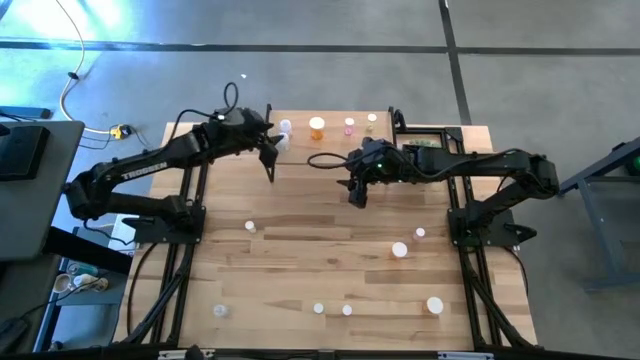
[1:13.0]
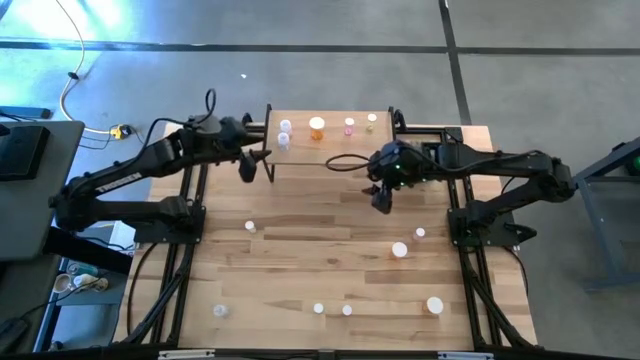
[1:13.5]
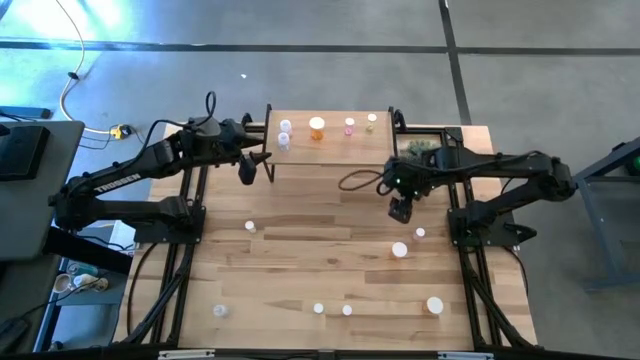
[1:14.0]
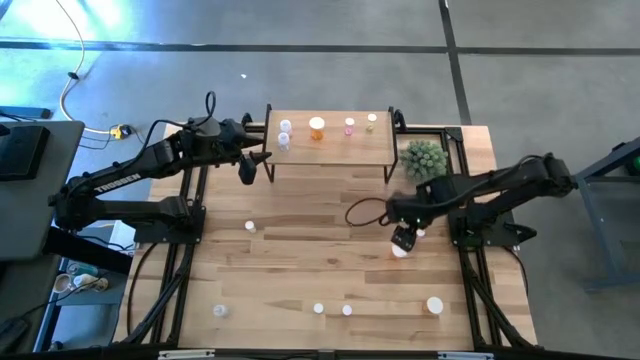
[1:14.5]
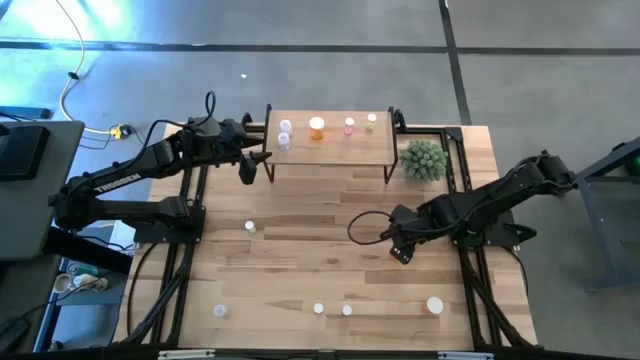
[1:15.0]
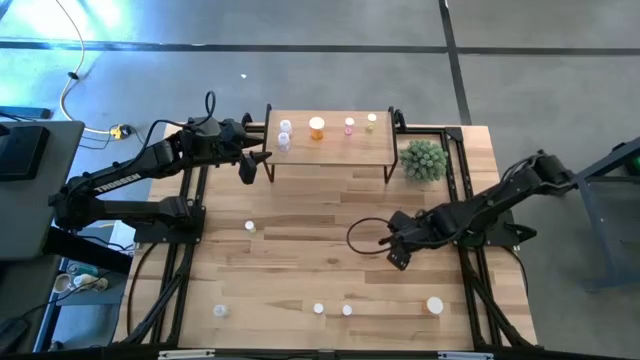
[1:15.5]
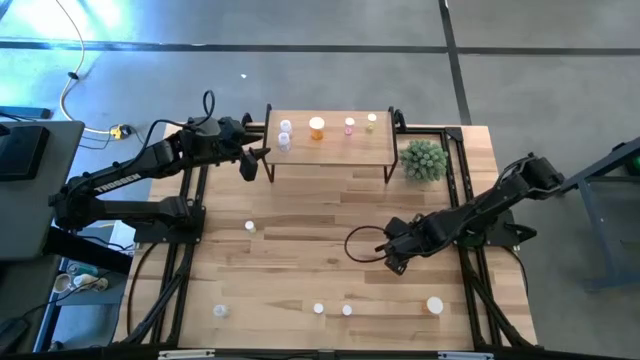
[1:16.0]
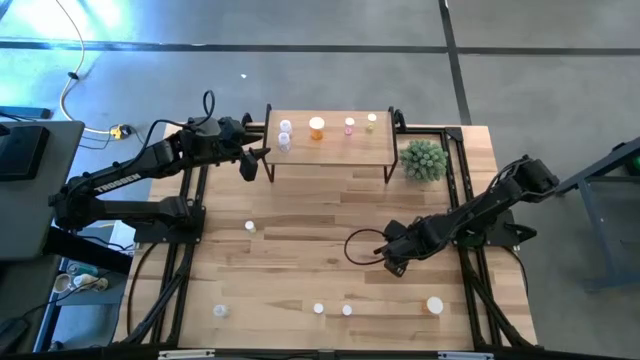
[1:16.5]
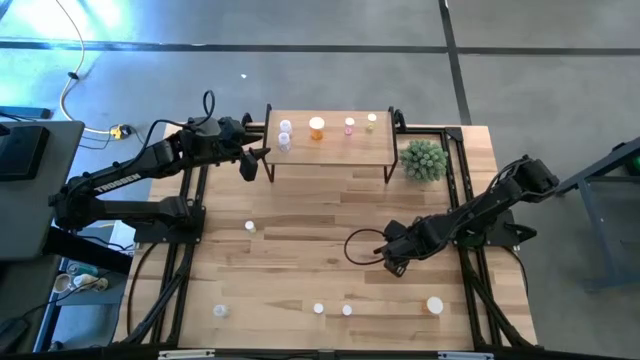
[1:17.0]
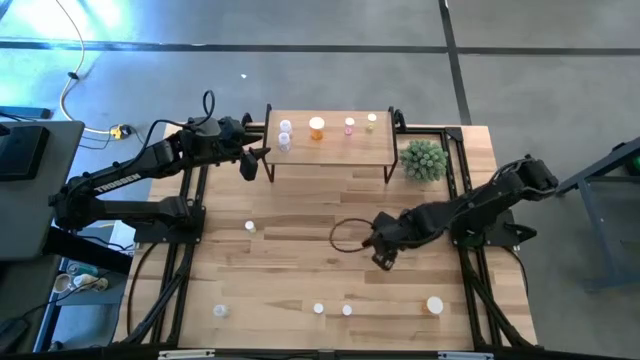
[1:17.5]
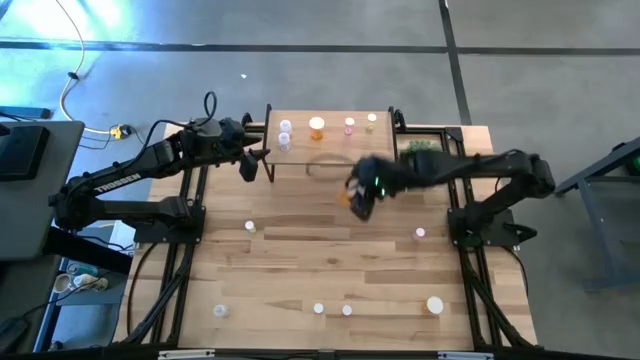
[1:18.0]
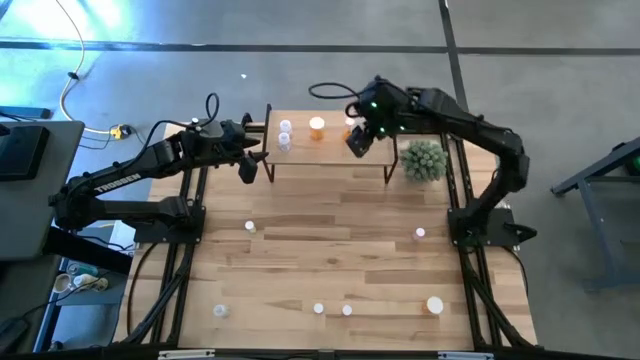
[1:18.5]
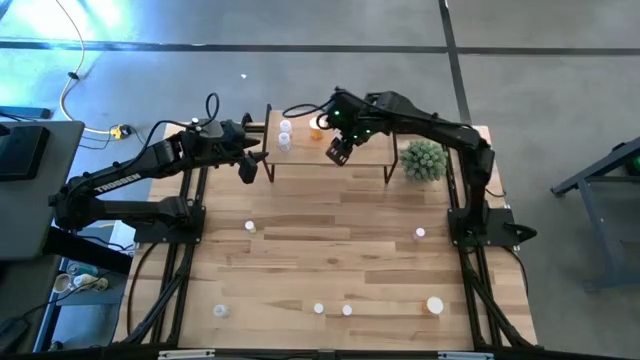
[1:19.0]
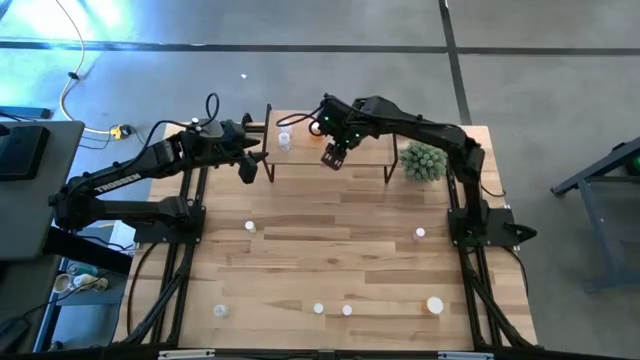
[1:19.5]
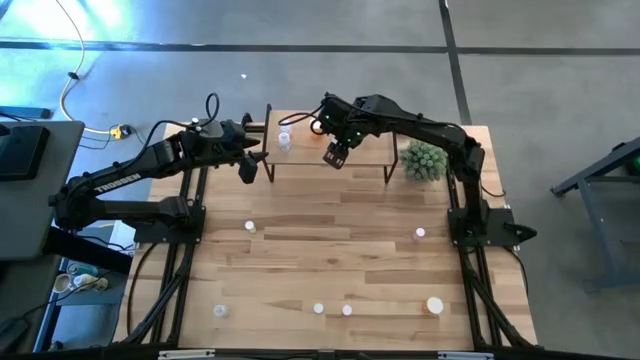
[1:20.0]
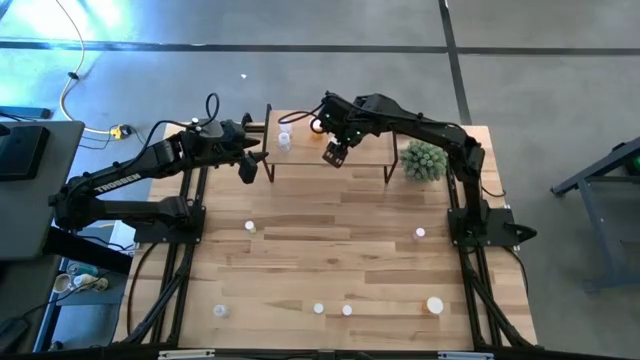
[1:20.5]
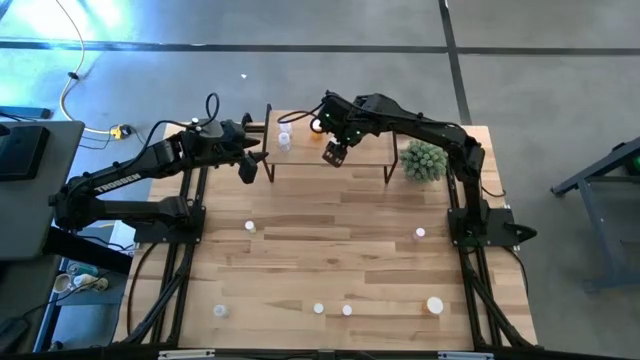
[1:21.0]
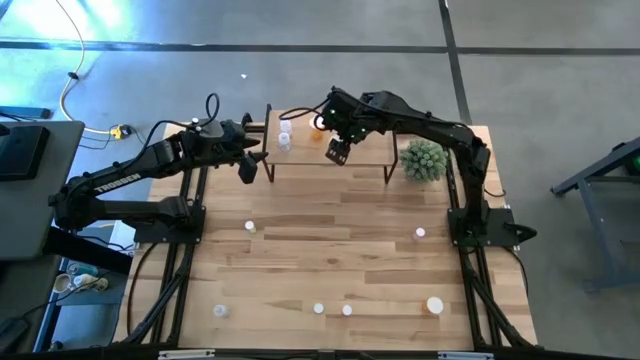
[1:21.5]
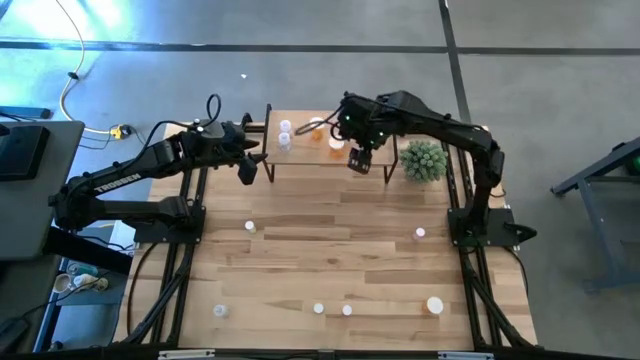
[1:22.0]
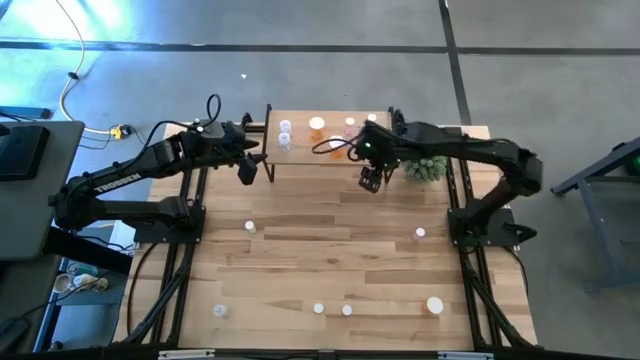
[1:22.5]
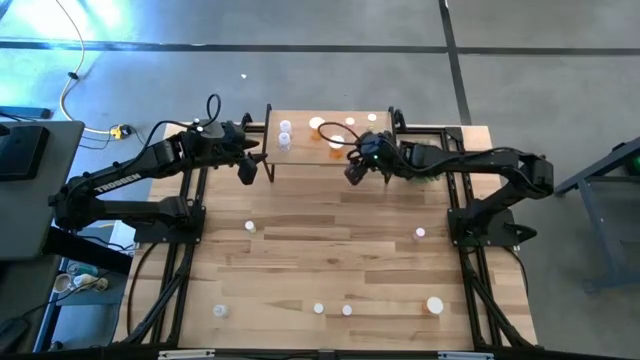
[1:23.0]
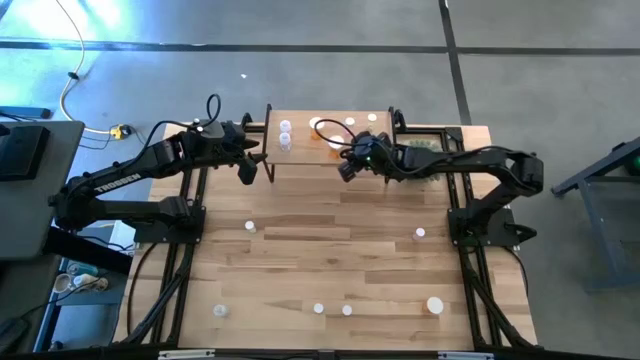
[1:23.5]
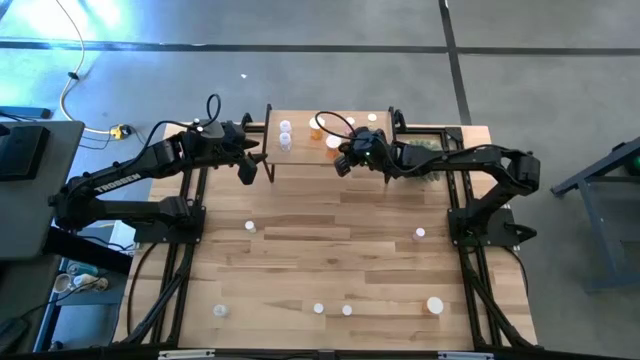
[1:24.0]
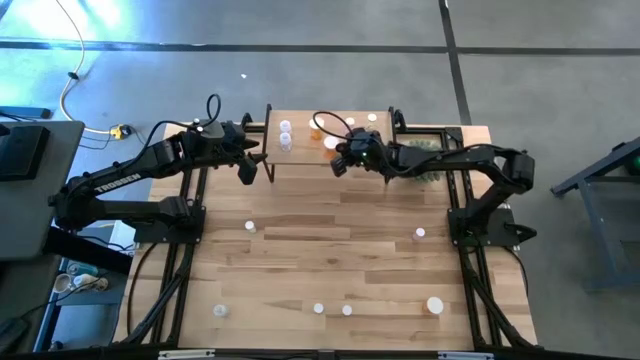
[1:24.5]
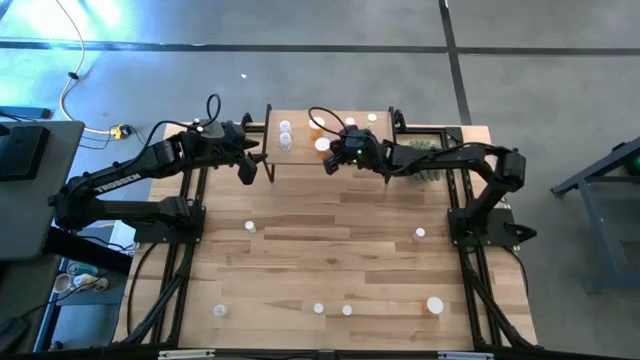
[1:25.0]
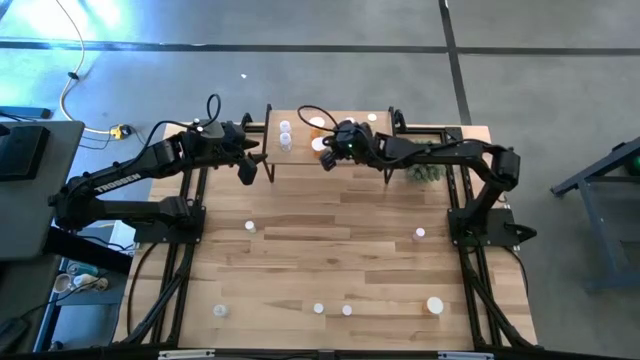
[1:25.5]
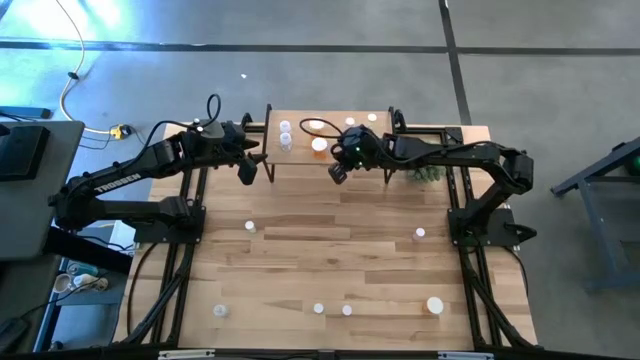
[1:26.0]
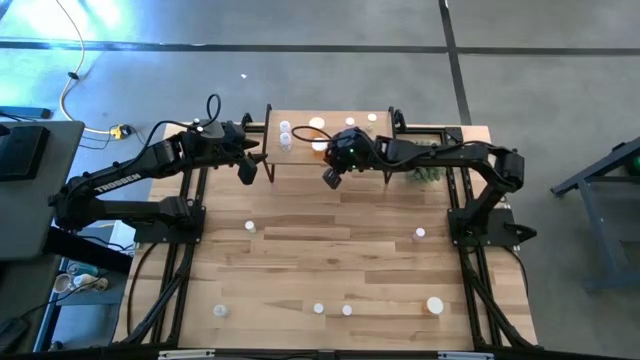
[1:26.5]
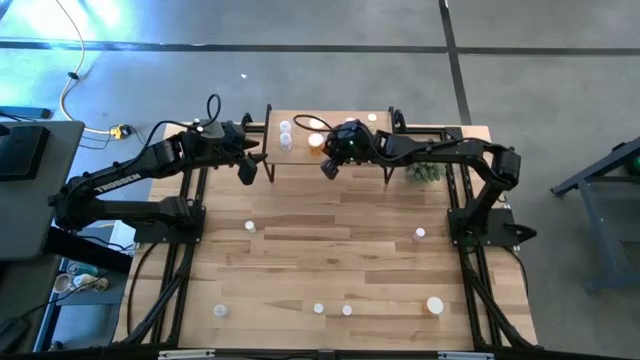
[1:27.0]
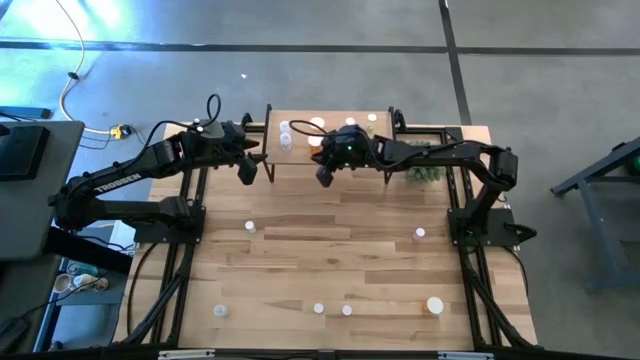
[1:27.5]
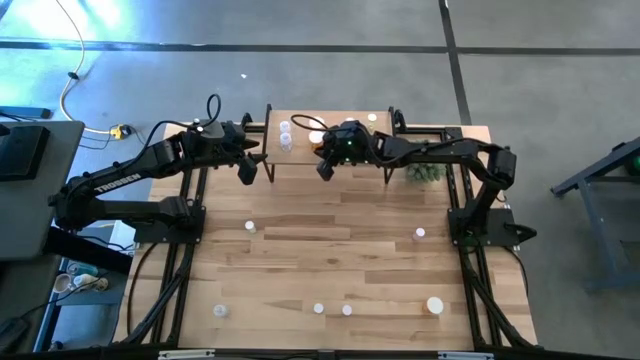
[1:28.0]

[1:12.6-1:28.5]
Task: Pick and place medicine bottles onto shelf by color
Put the top orange pill bottle aligned with the other orange pill bottle on the shelf

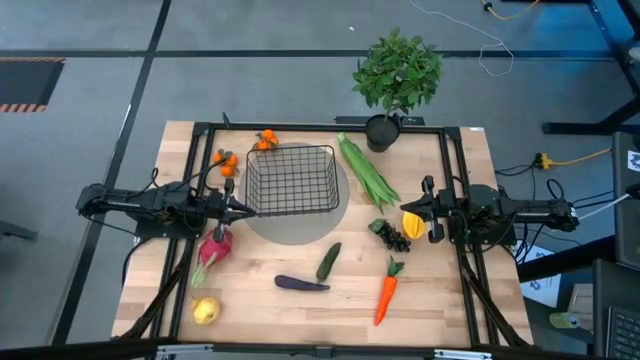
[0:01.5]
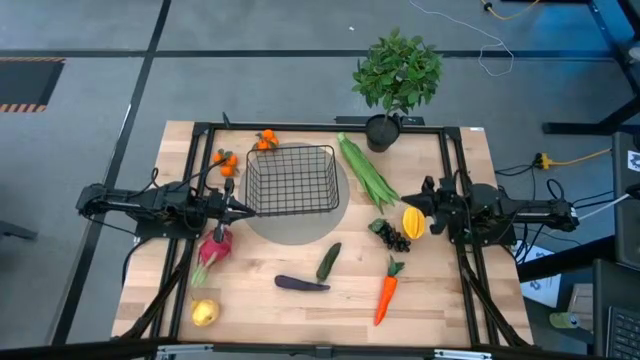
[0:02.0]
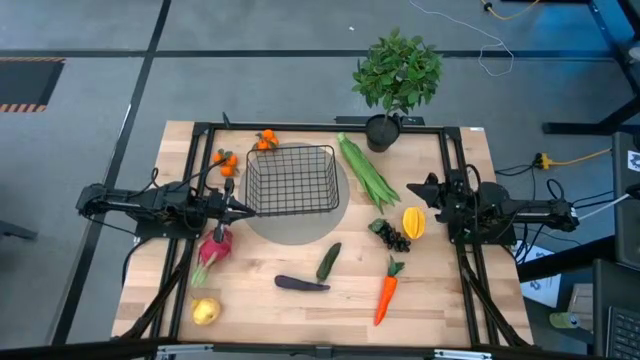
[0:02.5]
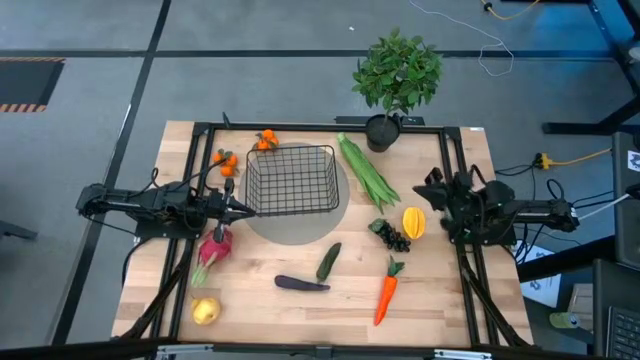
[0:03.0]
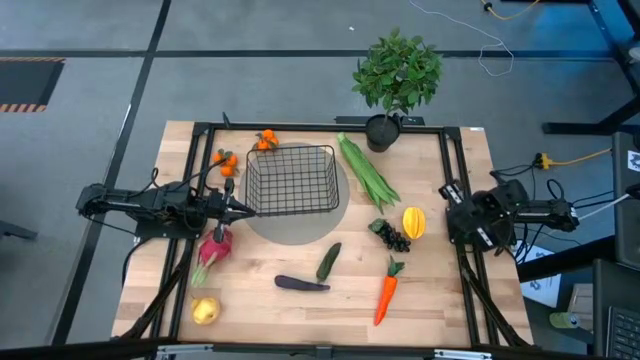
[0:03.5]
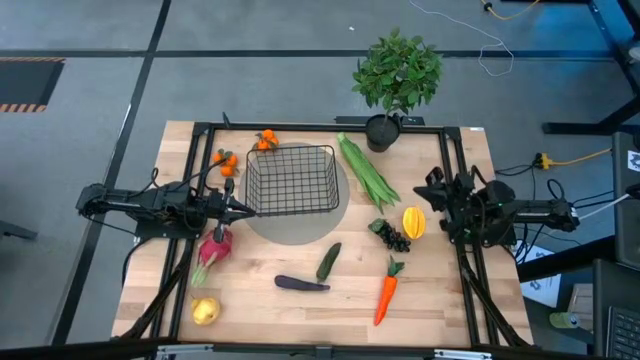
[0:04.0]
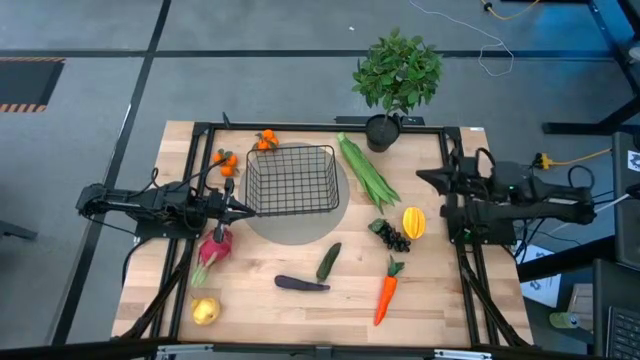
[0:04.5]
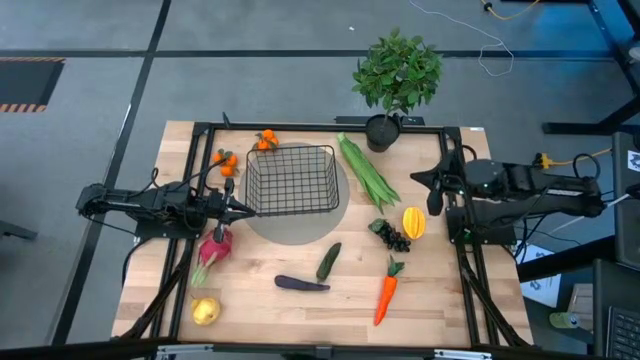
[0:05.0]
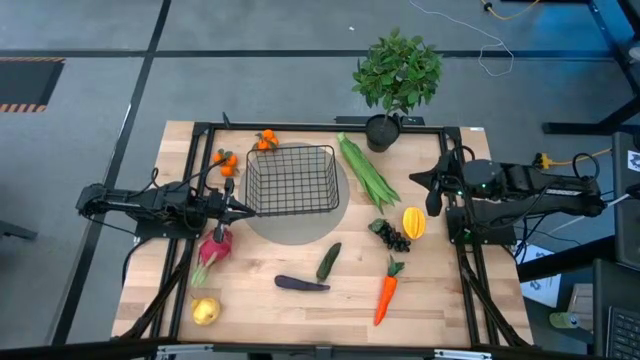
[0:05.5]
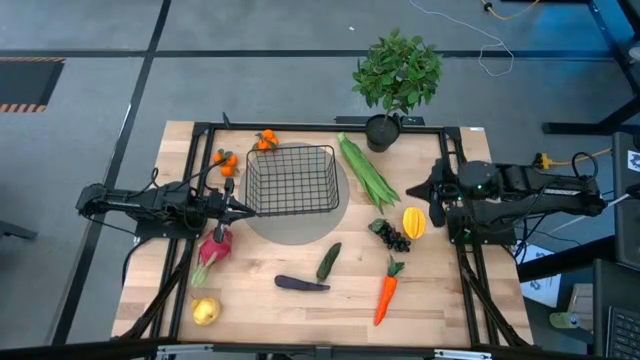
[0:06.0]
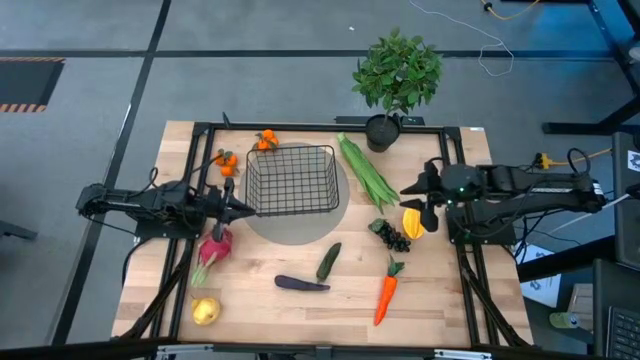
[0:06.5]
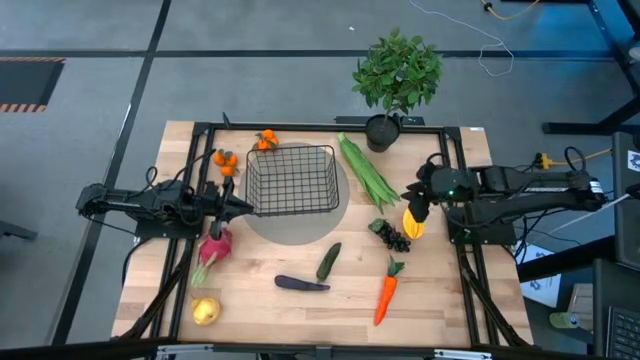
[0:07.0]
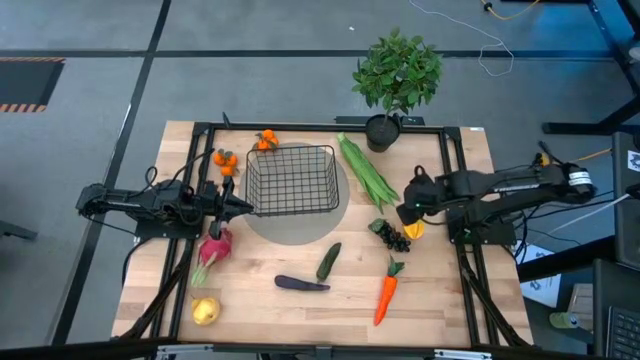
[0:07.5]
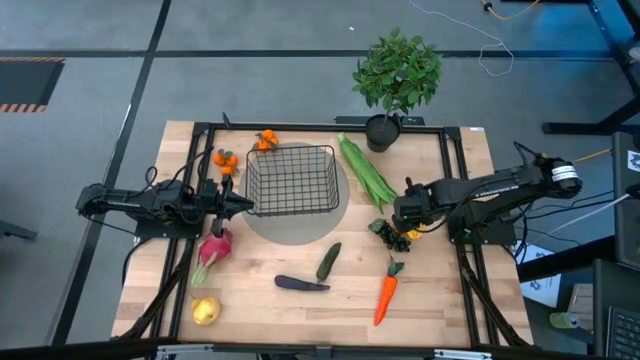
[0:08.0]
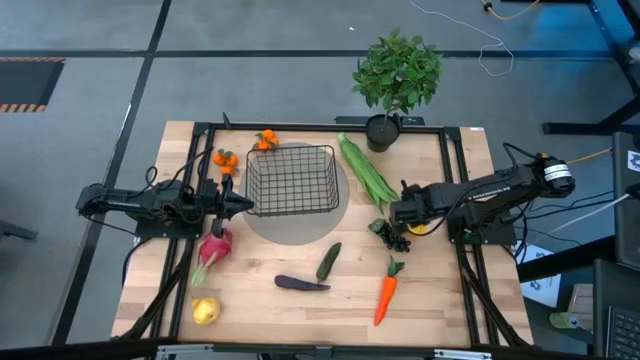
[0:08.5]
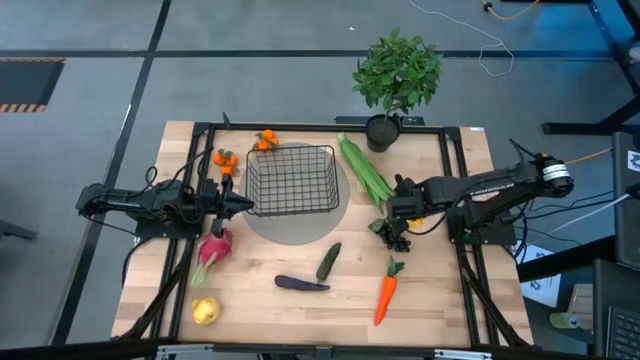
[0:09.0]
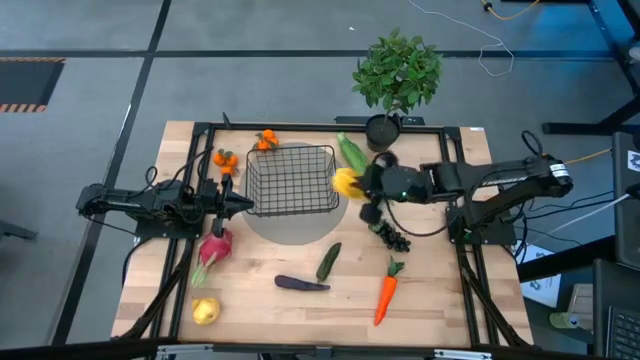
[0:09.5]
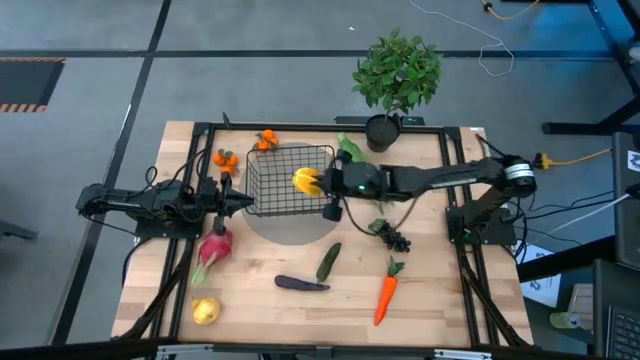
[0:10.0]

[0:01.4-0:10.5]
Task: Build produce basket
Put the yellow starfruit into the black wire basket
